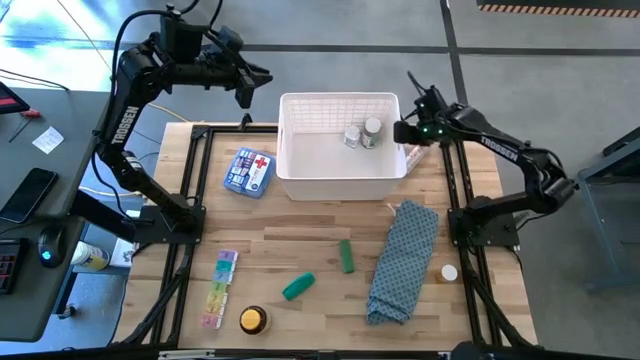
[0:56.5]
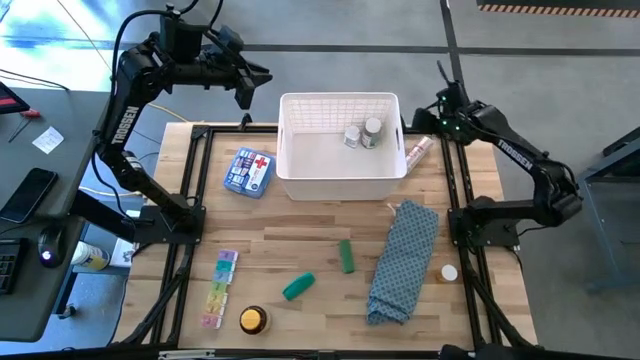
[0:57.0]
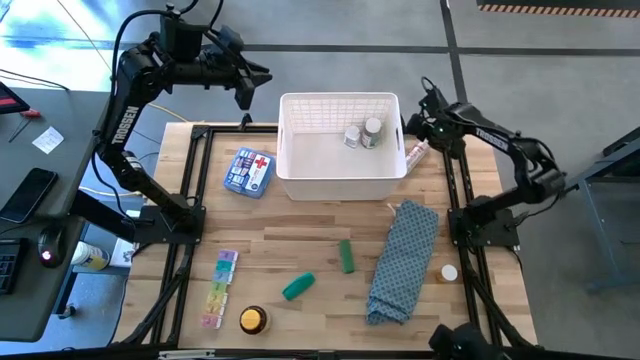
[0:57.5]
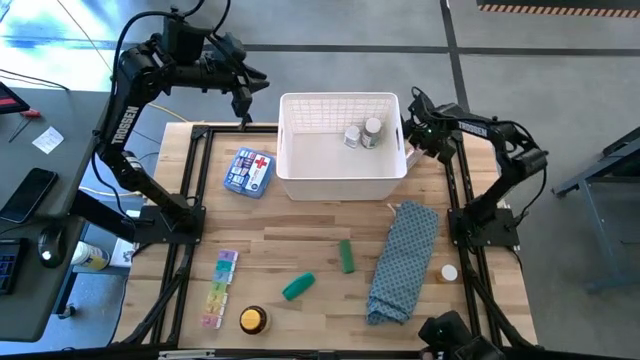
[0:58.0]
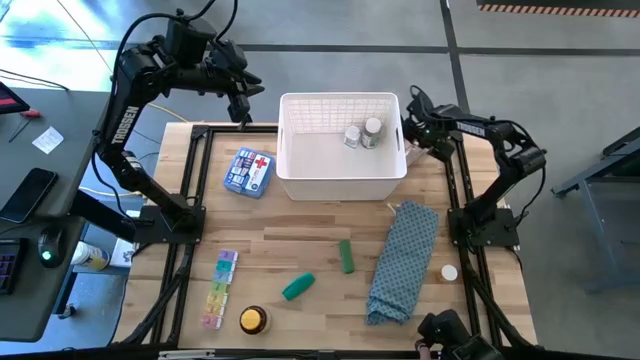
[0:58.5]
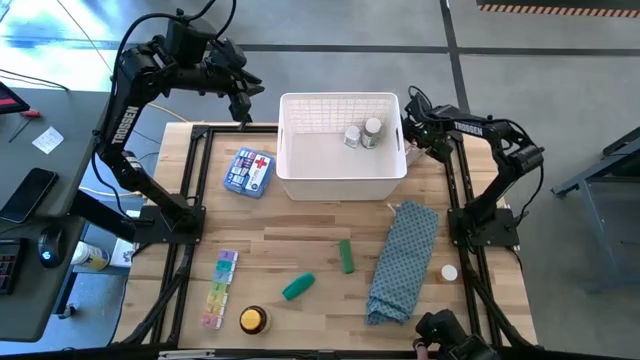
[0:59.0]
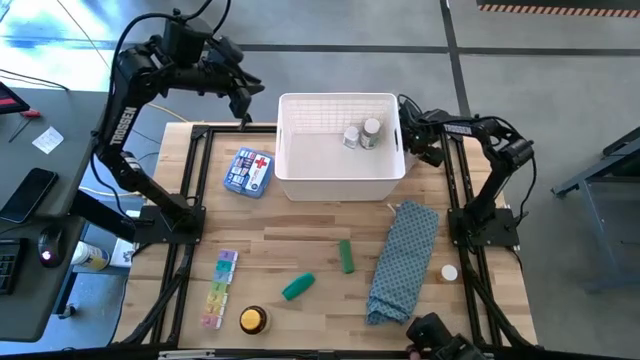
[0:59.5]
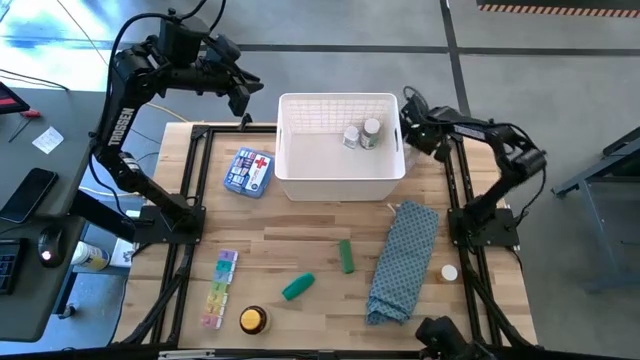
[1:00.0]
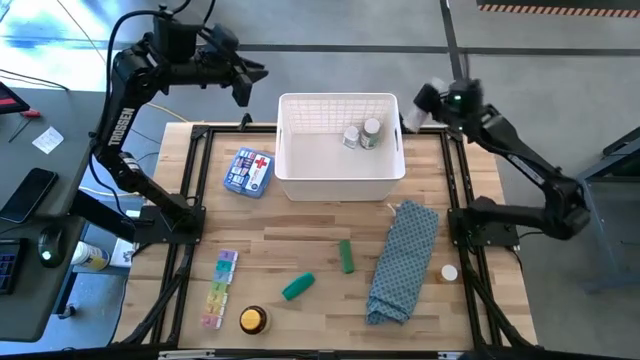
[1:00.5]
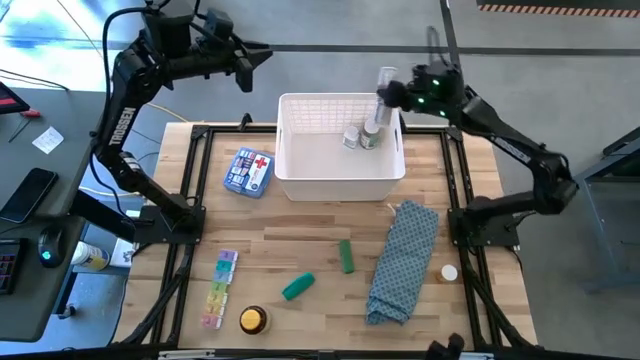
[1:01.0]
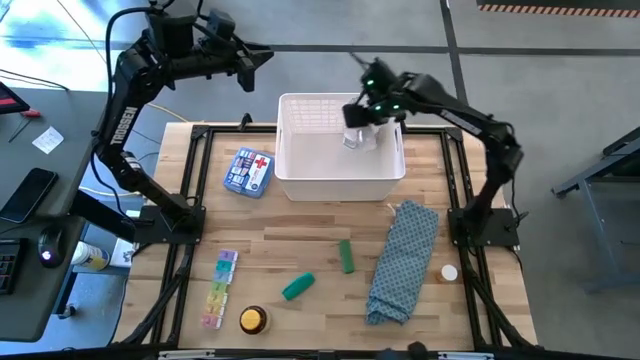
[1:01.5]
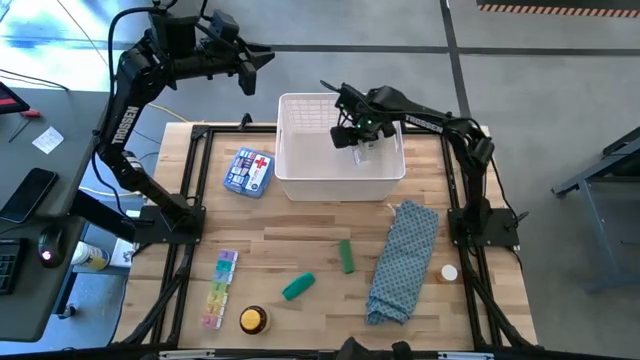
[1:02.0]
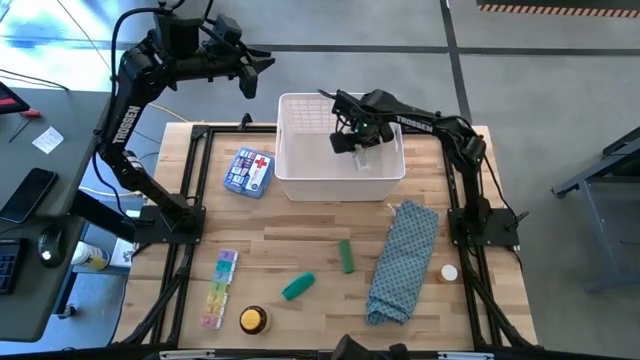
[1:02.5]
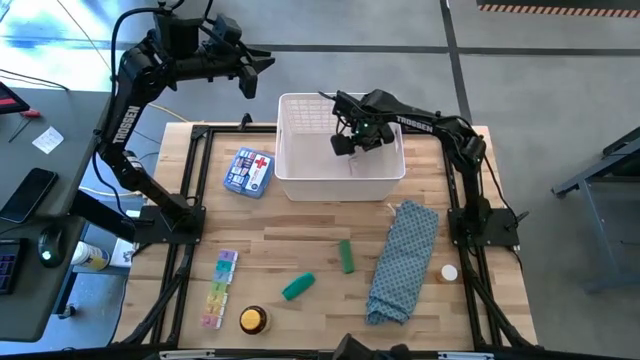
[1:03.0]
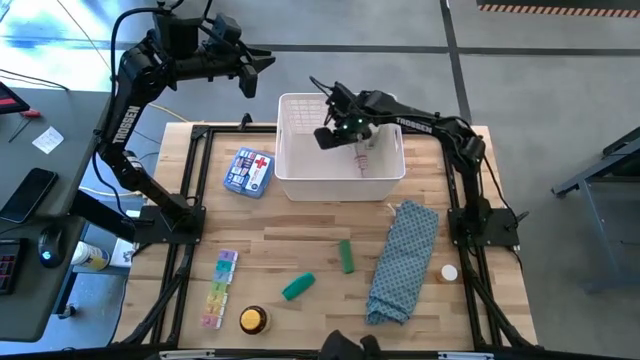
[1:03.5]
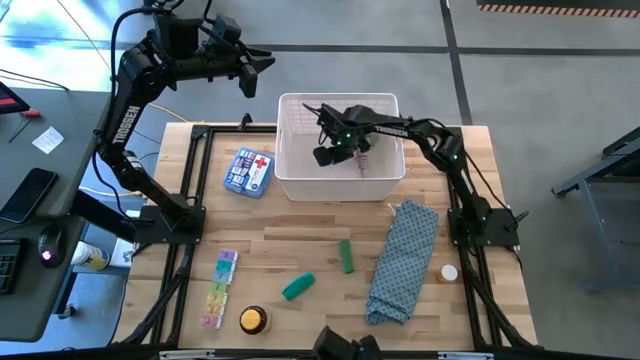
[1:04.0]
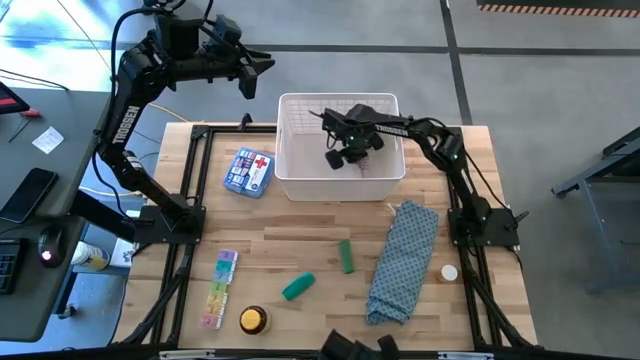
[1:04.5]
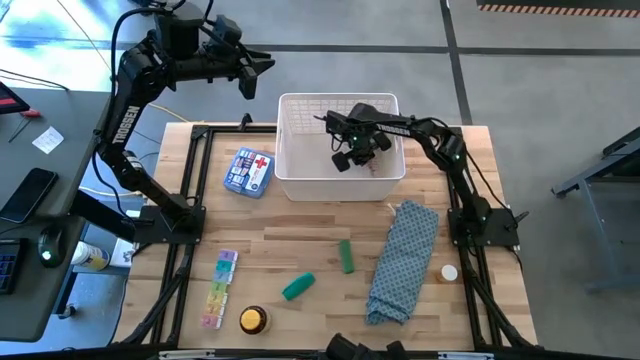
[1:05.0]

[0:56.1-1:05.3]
Task: Pick & place medical supplies in basket/bin
Put the brown bandage into the white bin

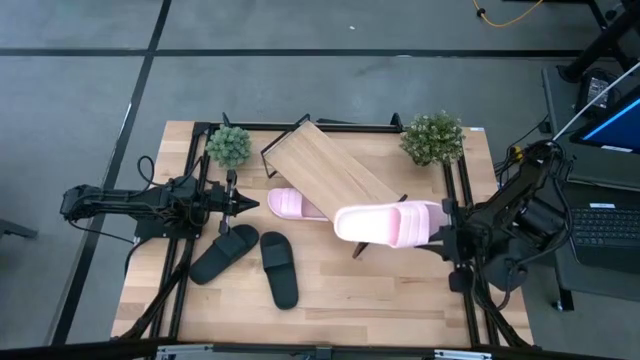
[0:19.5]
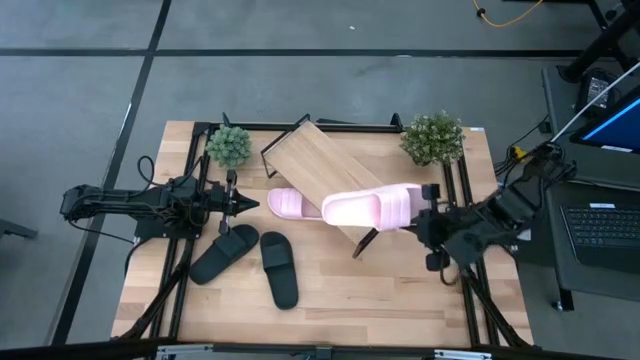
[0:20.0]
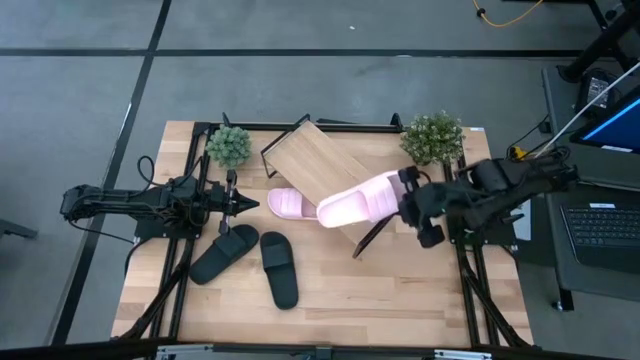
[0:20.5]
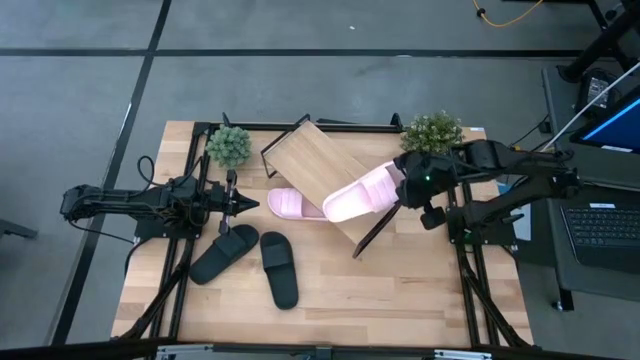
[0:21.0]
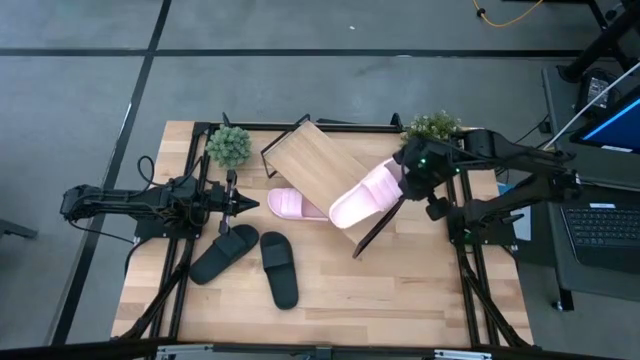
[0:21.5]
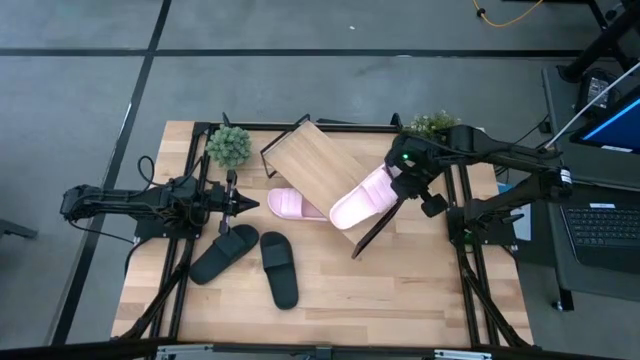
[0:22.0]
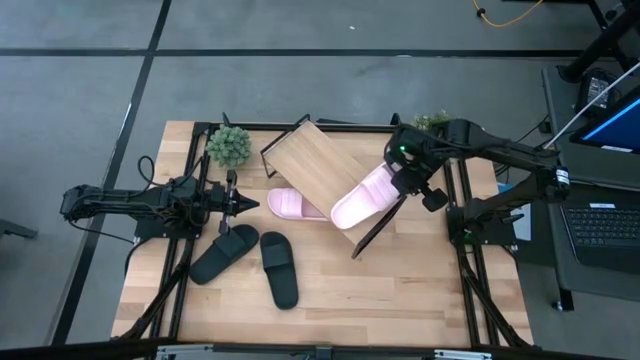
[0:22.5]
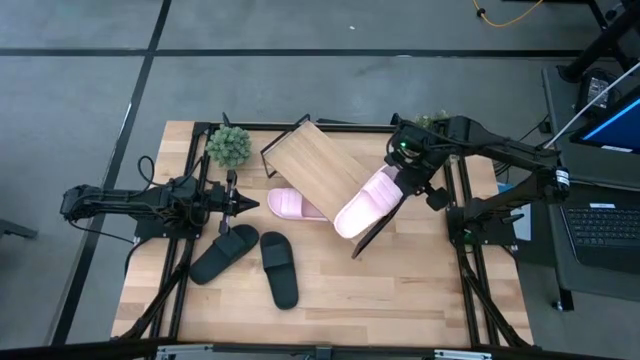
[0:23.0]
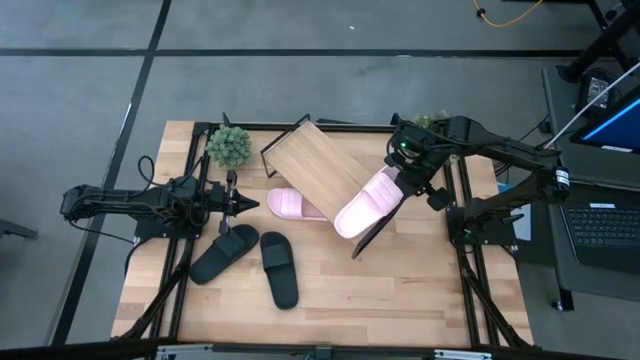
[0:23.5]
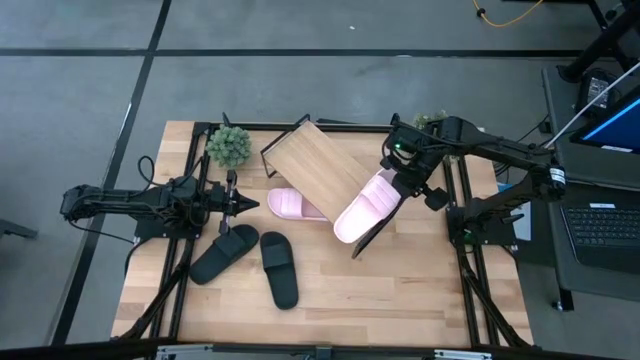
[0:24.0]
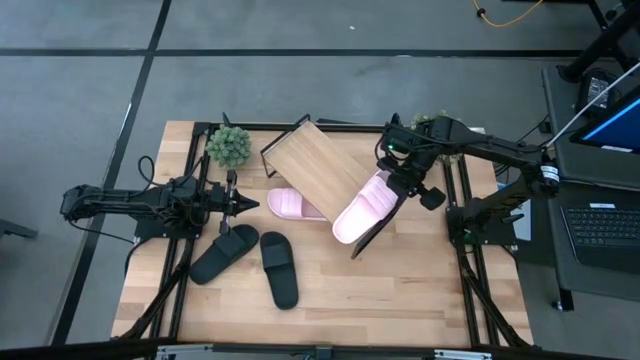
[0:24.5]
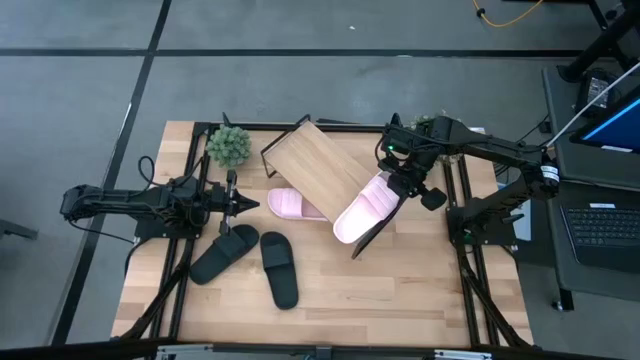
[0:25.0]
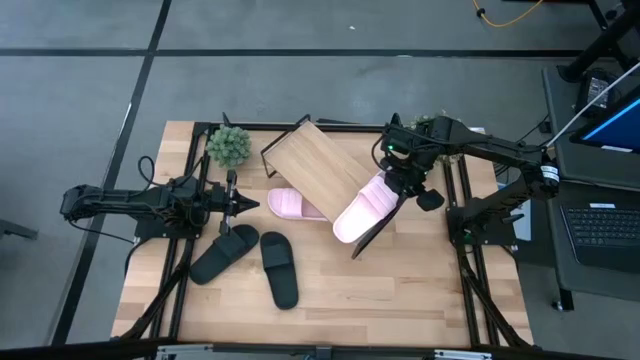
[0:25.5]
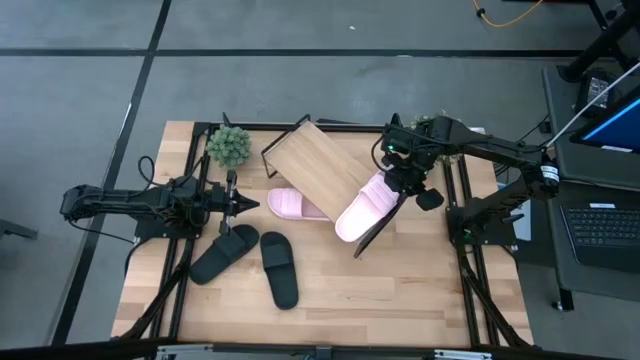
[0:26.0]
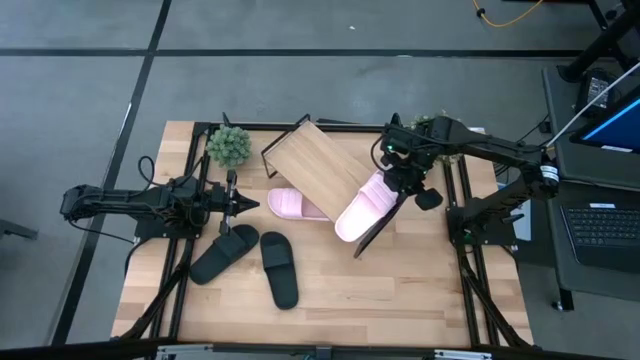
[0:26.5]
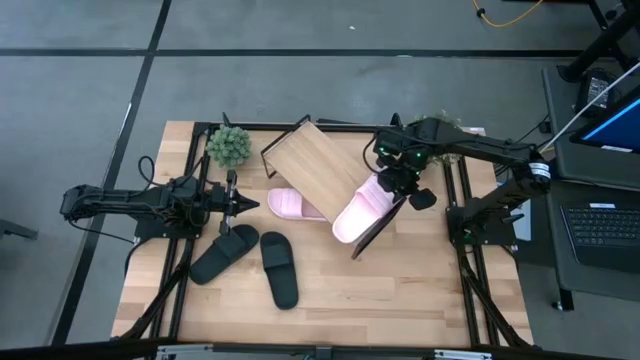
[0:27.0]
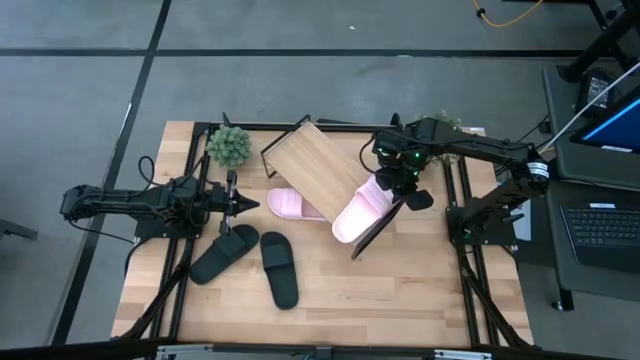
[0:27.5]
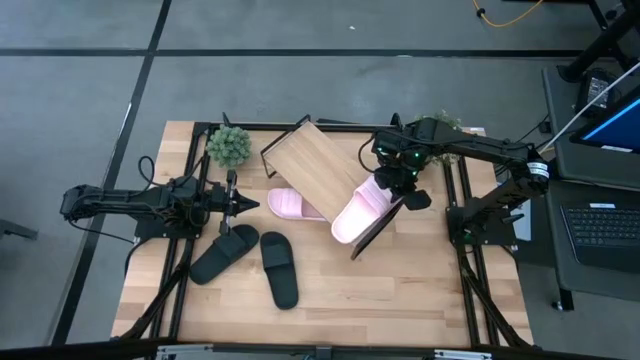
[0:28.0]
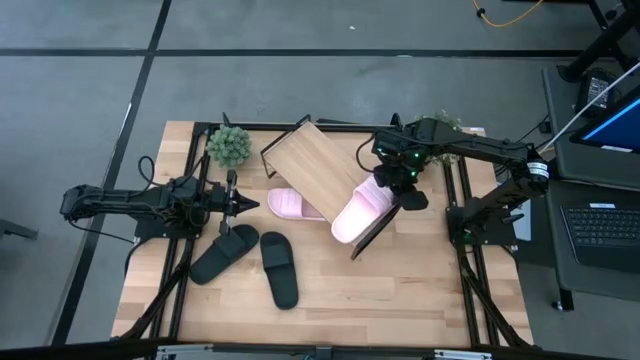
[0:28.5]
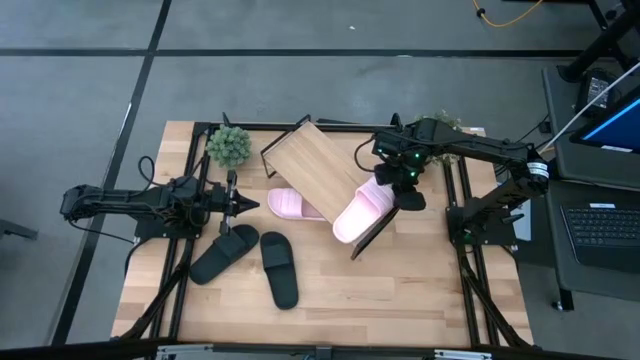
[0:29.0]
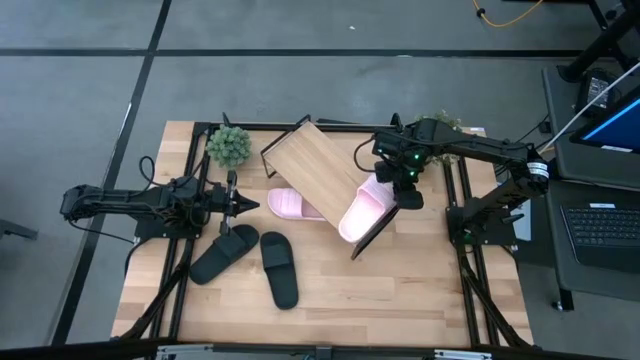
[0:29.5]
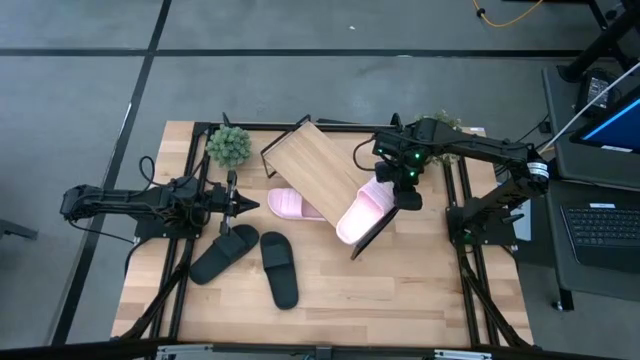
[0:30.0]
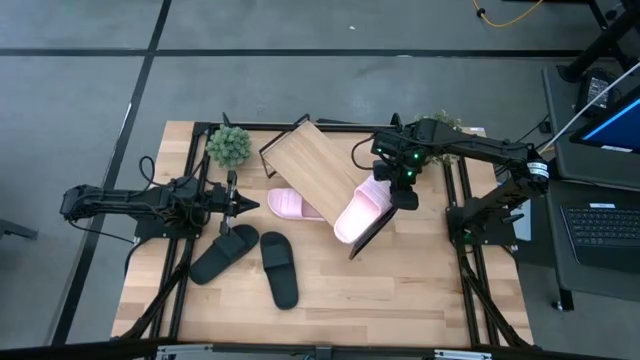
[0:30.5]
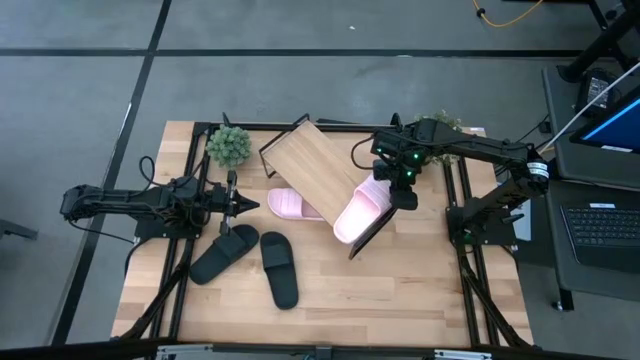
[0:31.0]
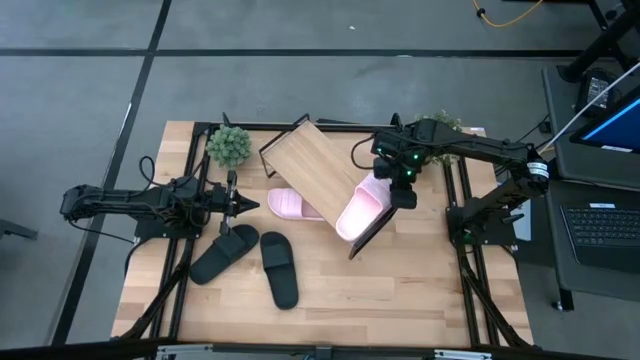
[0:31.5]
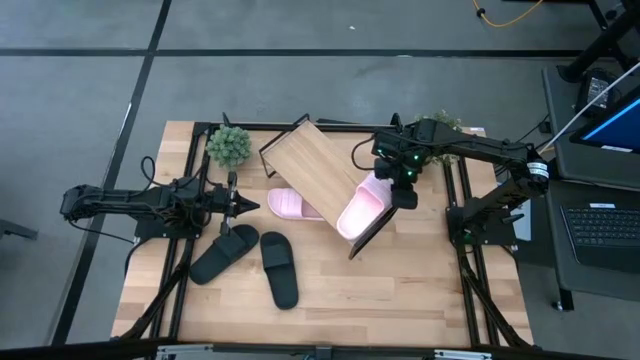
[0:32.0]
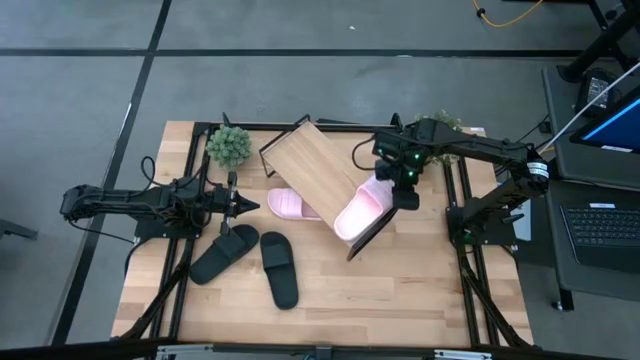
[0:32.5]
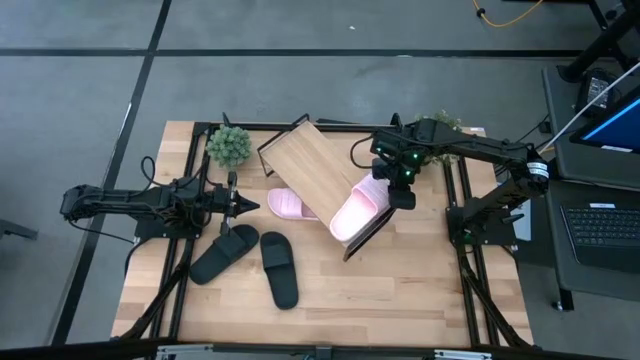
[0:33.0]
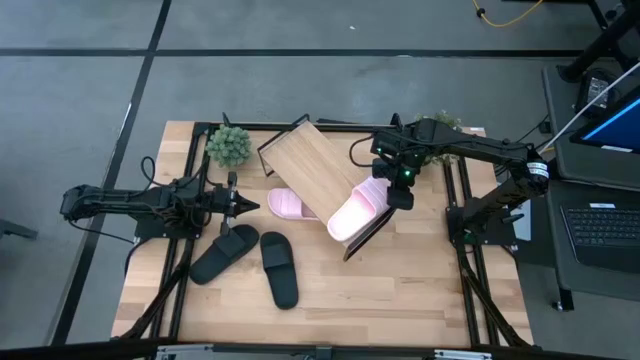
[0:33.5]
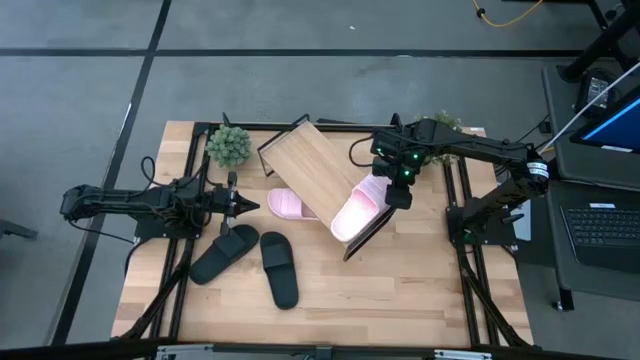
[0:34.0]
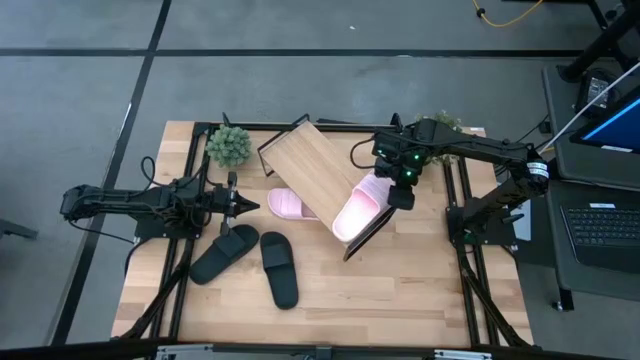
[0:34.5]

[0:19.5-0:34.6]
Task: Pick and place slides into the shelf
Put the right pink slipper on the shelf
